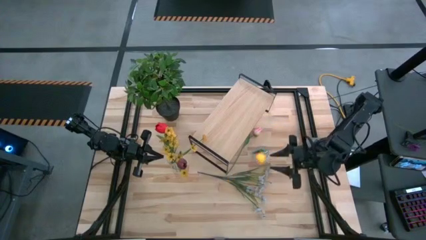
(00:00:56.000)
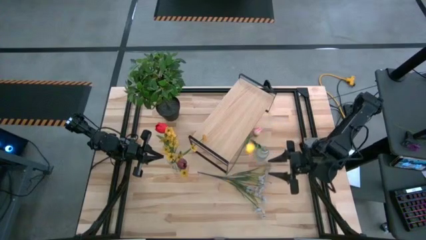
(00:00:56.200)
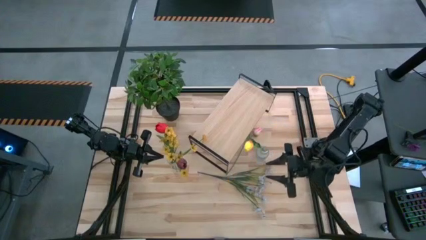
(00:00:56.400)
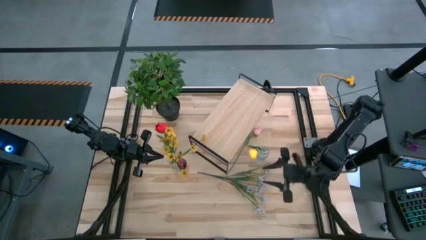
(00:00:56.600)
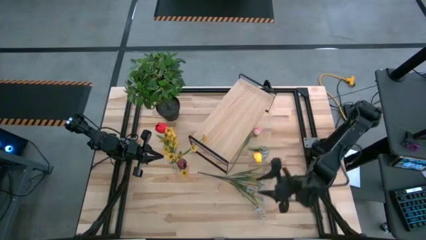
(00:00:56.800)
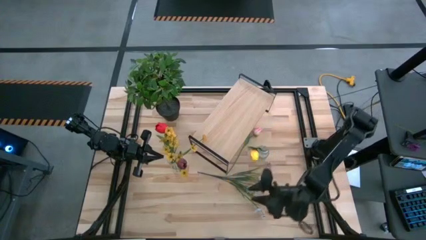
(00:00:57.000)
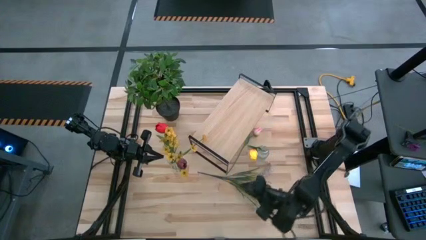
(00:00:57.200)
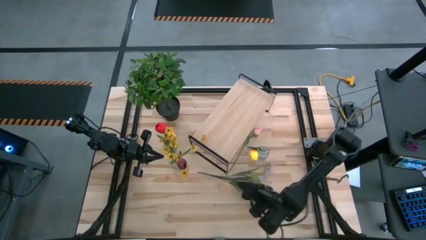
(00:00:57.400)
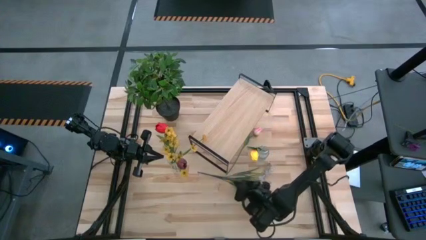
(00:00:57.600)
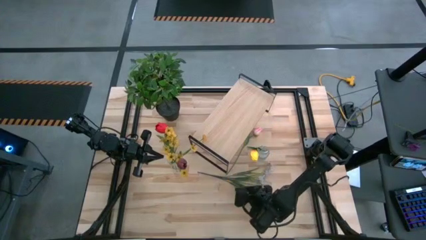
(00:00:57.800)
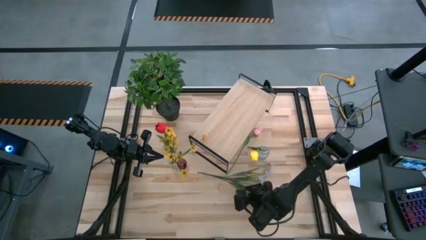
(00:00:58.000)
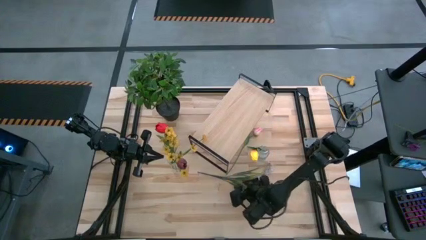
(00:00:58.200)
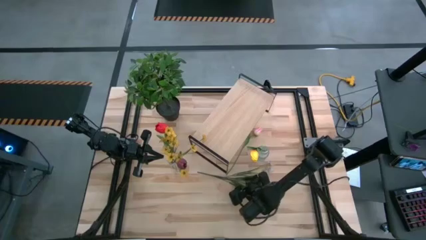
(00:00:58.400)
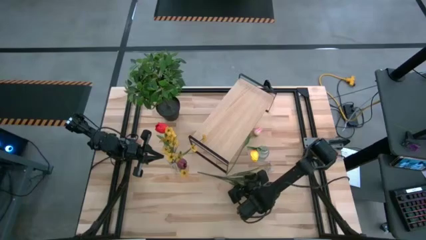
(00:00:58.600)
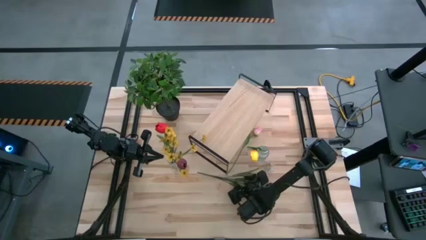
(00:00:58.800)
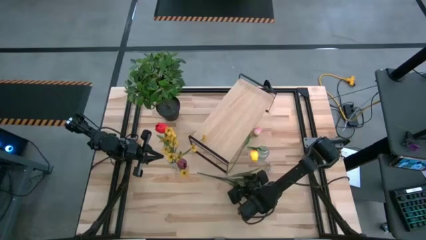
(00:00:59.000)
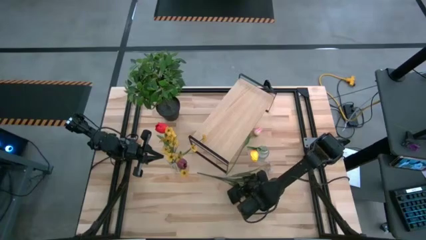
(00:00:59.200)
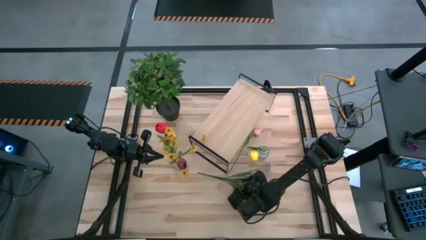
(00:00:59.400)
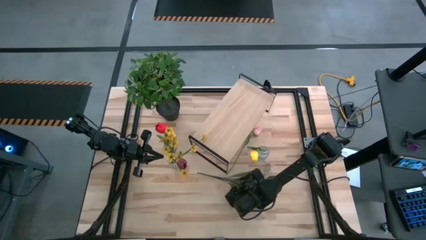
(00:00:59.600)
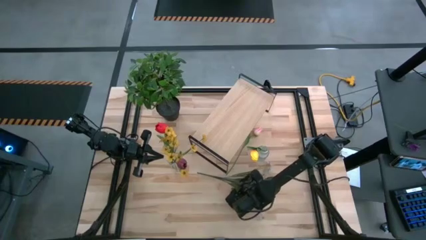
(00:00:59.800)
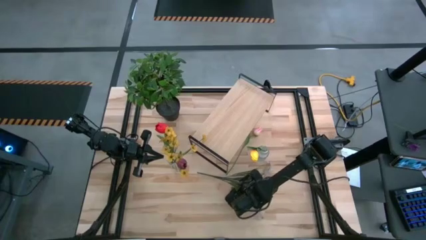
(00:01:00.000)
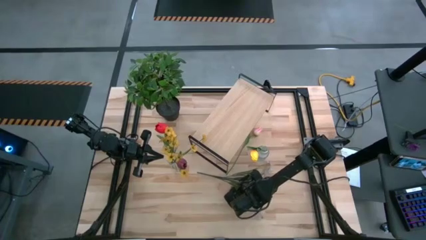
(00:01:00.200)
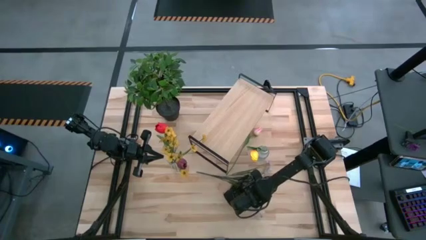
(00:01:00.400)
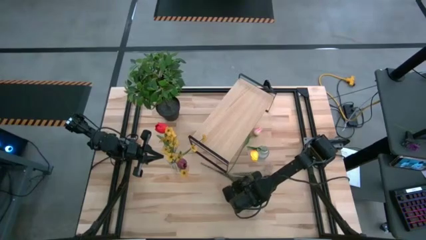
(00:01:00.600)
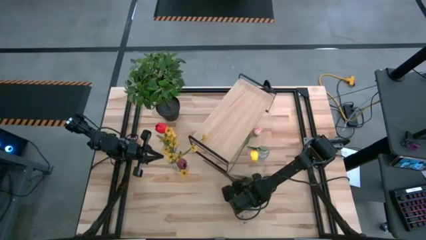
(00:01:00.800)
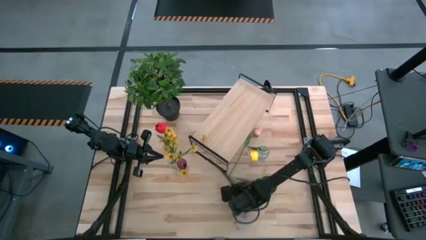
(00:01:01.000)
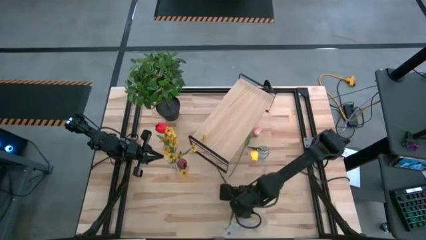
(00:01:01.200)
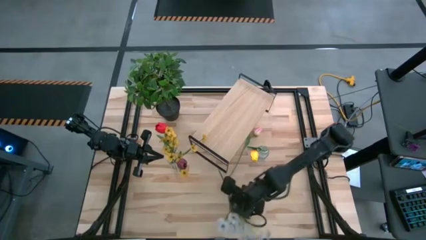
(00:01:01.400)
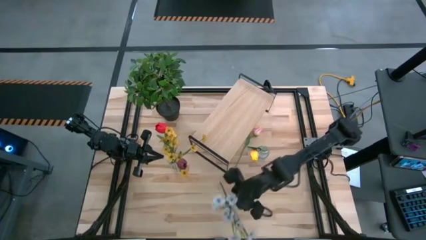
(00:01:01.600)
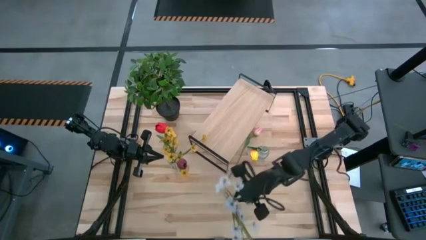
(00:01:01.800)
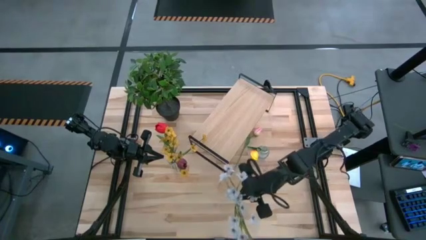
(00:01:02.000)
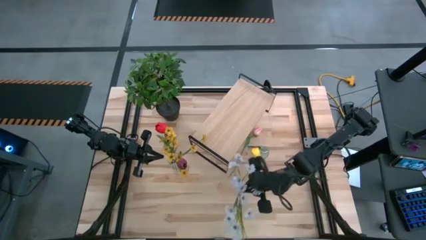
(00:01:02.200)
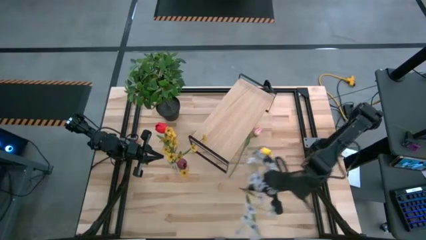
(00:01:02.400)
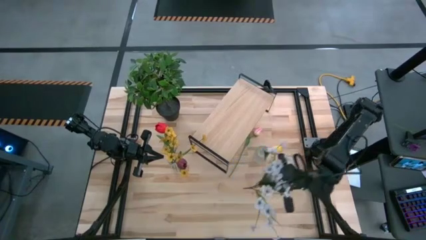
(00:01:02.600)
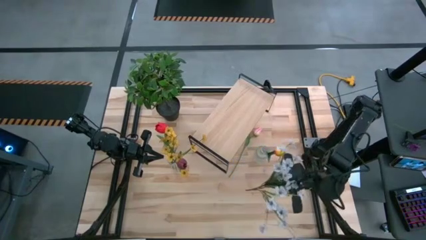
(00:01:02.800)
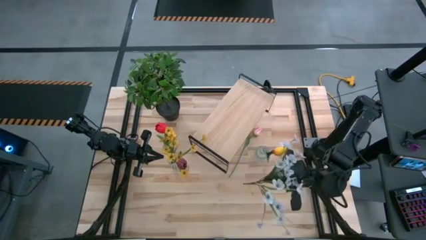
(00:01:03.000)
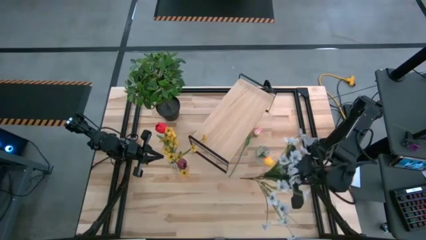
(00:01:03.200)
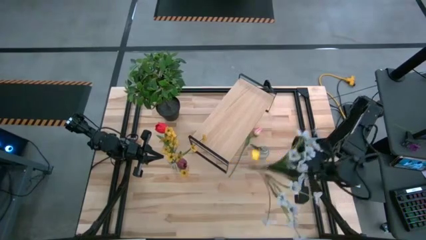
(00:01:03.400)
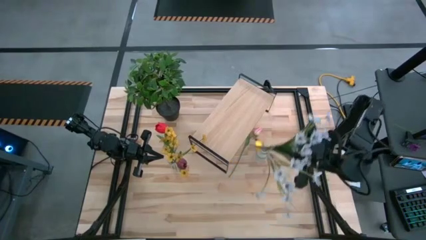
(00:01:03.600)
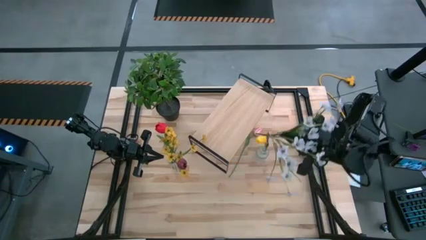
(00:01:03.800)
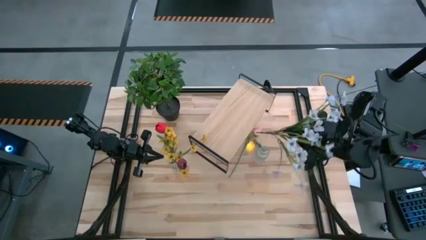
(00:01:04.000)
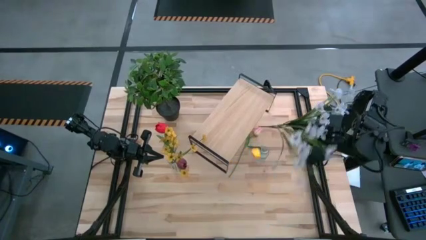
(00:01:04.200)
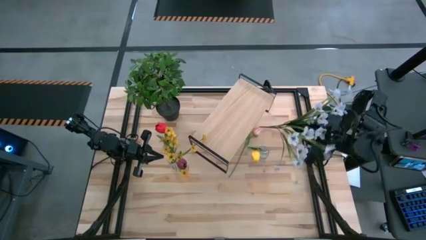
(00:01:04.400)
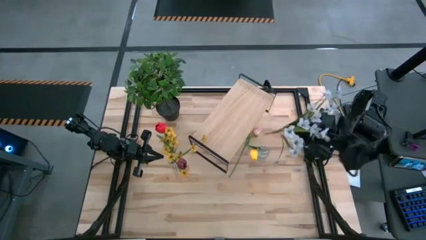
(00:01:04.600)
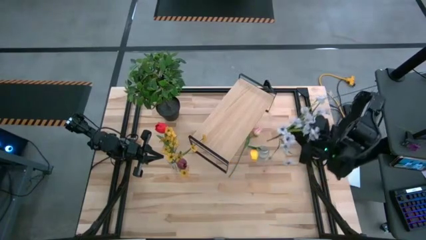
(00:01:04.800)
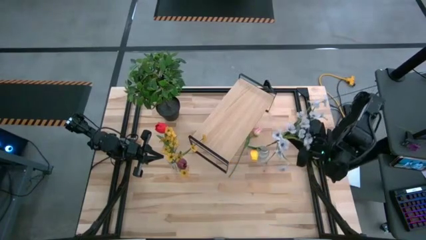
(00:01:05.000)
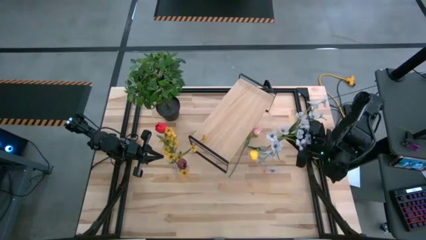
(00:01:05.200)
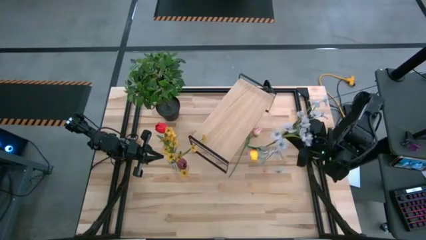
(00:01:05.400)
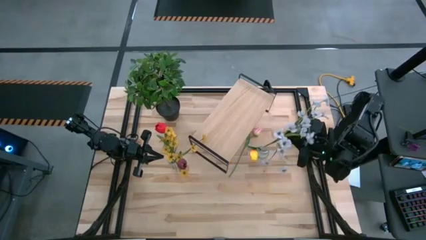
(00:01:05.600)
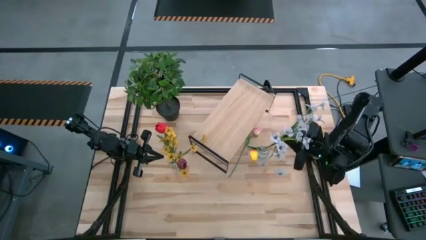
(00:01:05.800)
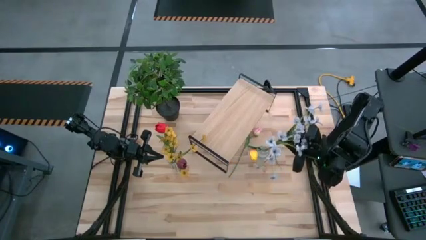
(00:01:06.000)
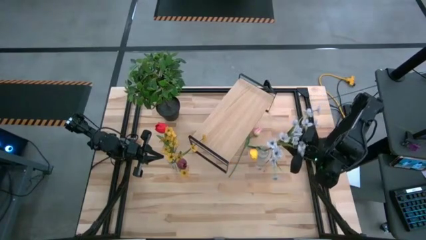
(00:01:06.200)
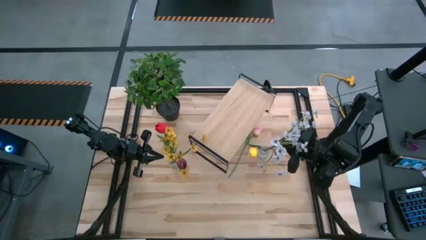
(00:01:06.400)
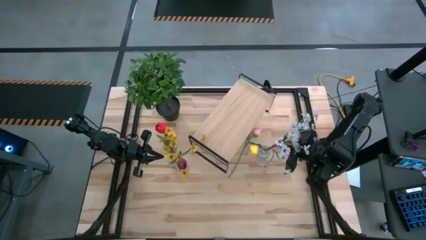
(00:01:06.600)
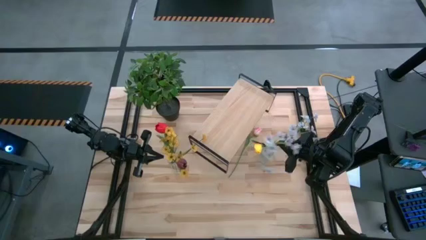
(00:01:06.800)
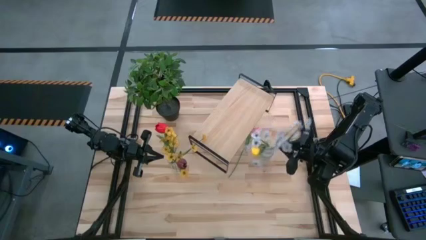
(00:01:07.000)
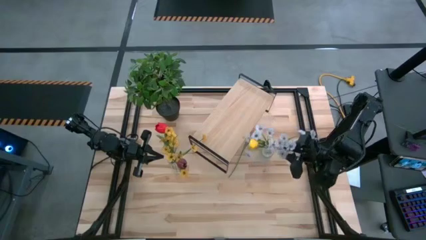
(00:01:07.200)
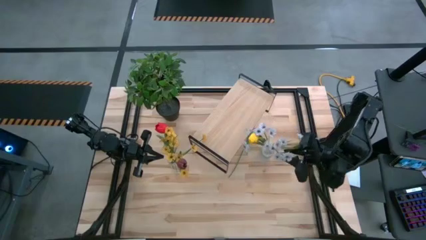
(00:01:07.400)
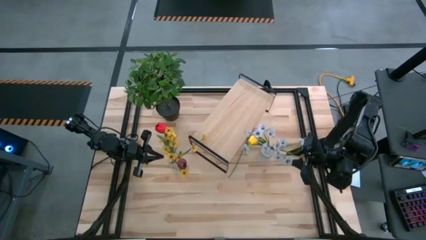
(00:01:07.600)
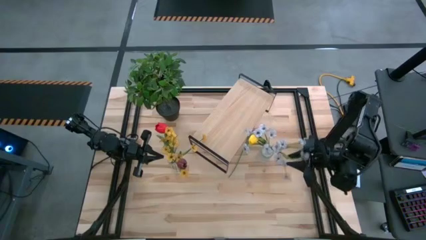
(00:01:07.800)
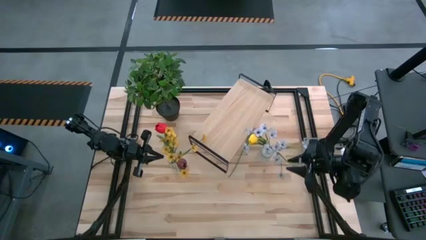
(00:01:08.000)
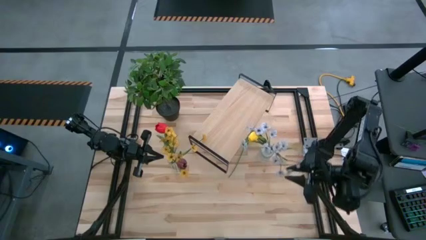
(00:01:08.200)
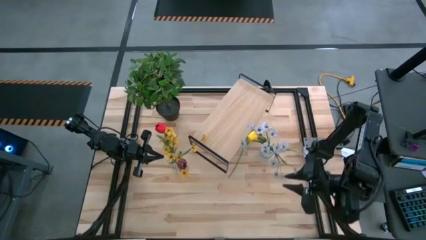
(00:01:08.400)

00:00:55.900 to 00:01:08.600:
Task: Pick and place flowers into a vace then onto a shelf
Put the white flowers into the right transparent vase
